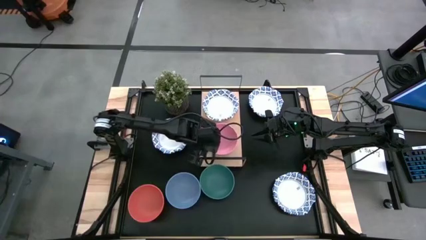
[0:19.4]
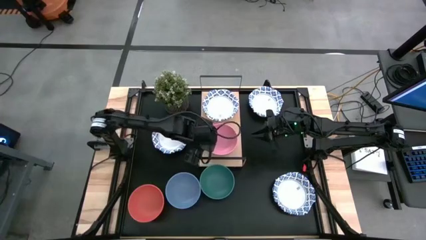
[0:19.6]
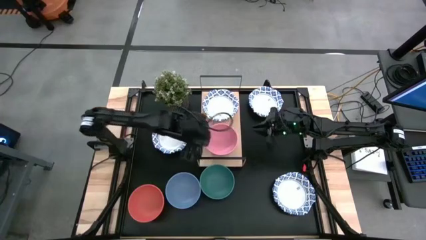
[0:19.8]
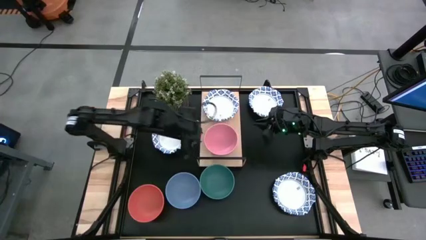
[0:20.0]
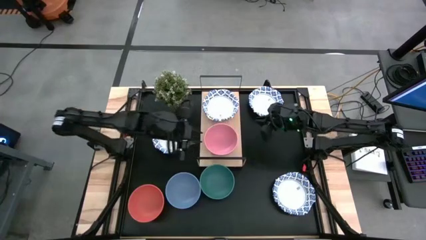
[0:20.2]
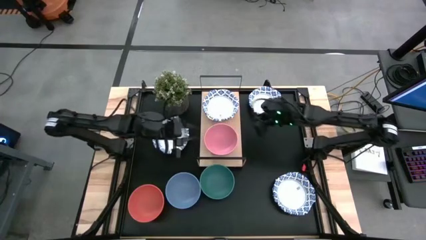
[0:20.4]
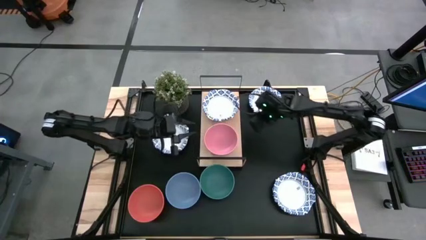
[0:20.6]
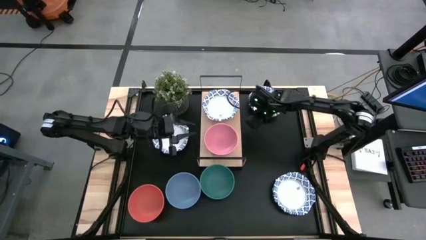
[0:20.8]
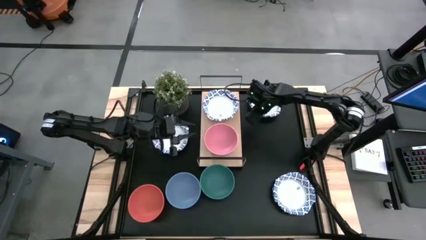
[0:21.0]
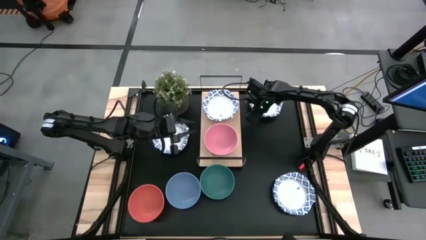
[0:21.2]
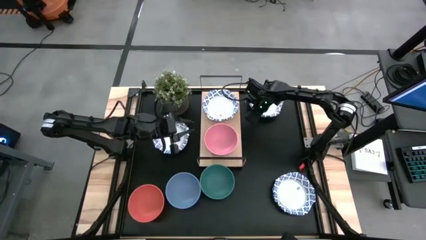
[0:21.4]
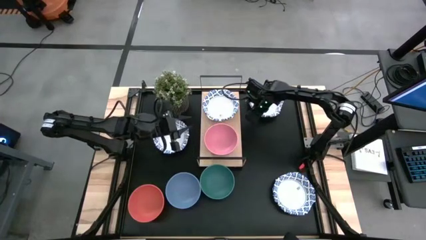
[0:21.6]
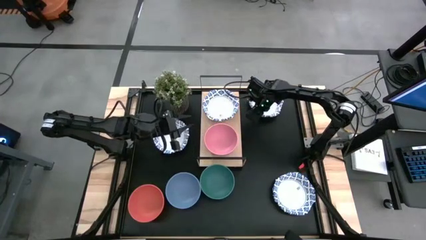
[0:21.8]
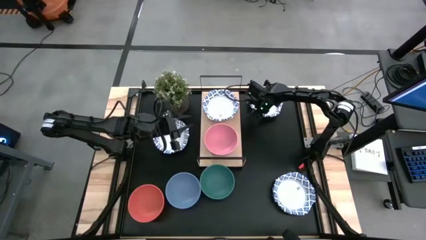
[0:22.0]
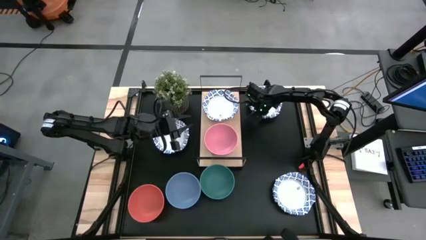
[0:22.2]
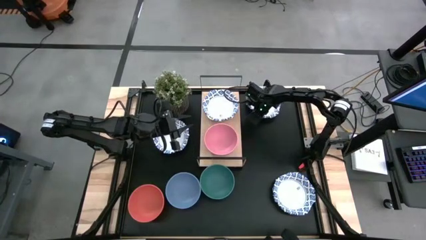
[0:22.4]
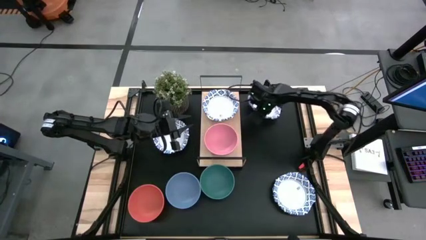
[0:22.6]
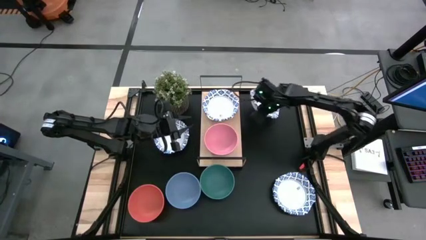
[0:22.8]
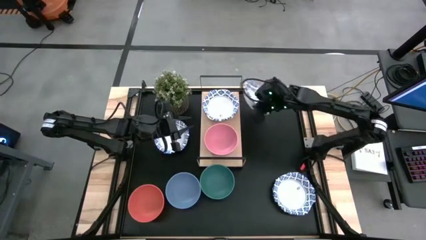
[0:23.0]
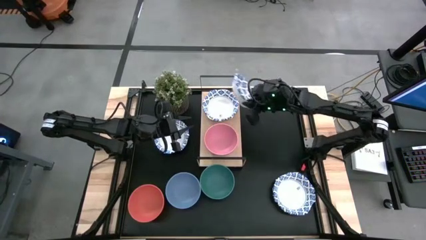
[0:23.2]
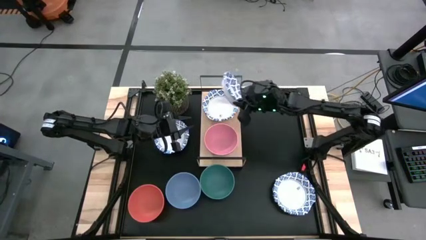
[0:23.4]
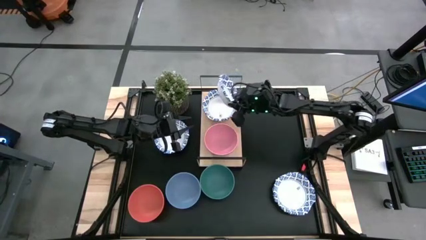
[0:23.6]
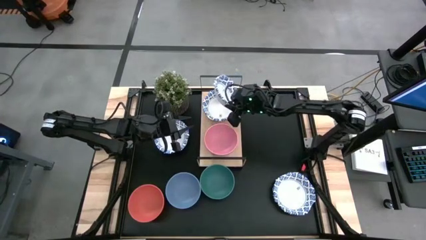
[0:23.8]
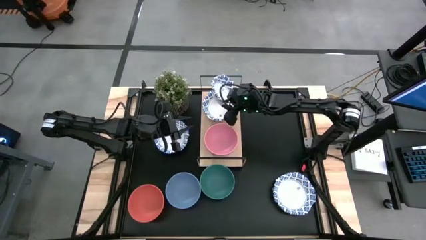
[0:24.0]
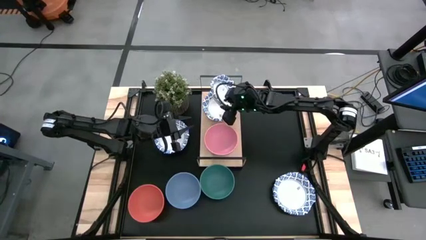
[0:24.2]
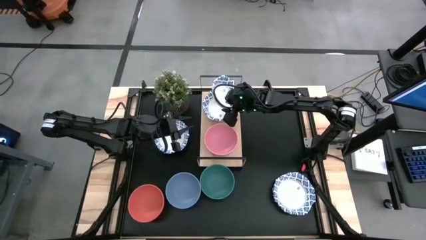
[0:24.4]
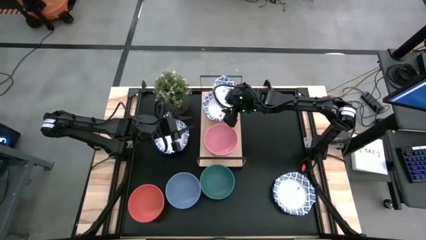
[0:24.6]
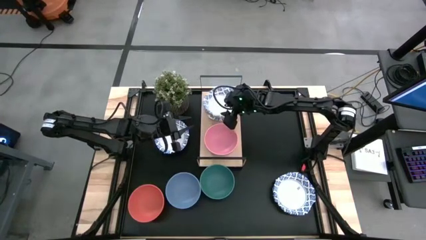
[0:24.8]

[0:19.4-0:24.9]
Task: Place and stack bowls onto a shelf
Stack the white paper bowl on top of the white paper bowl on the shelf

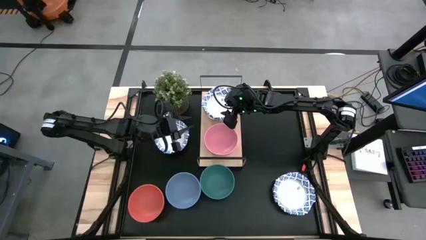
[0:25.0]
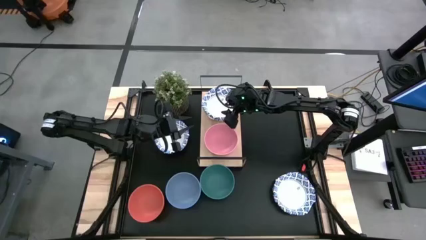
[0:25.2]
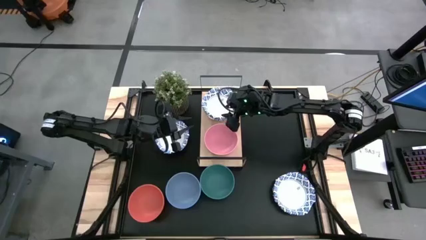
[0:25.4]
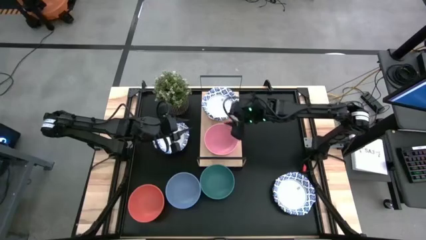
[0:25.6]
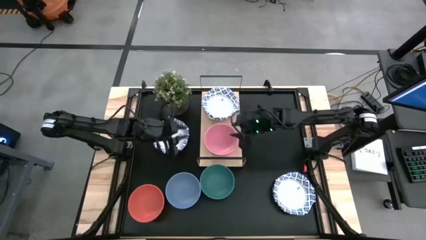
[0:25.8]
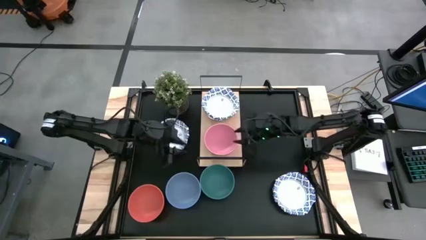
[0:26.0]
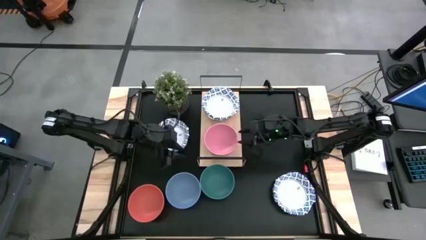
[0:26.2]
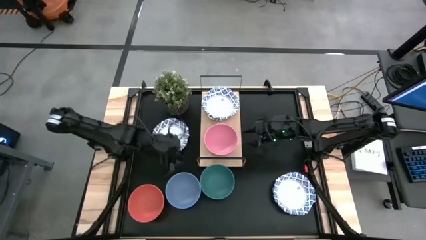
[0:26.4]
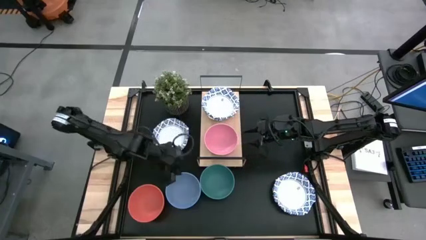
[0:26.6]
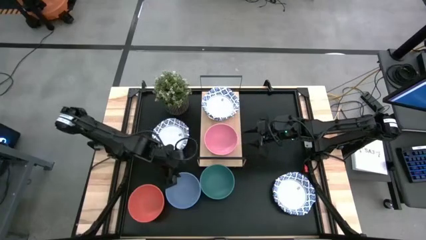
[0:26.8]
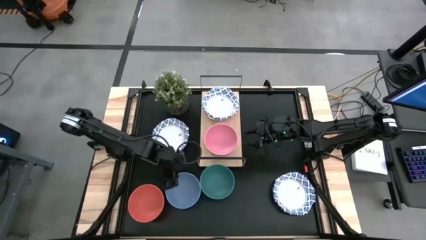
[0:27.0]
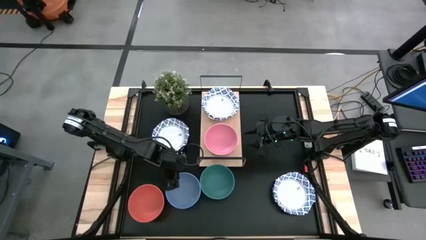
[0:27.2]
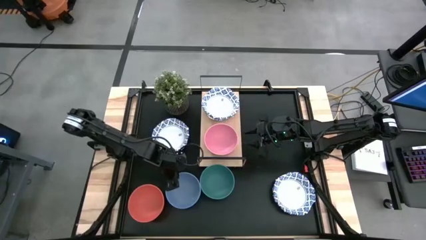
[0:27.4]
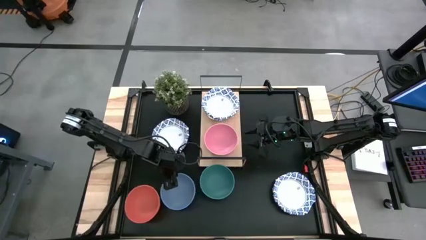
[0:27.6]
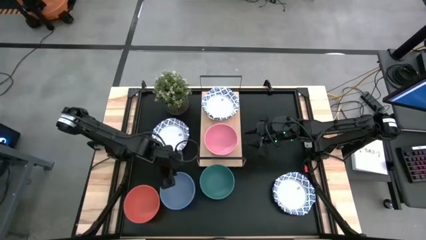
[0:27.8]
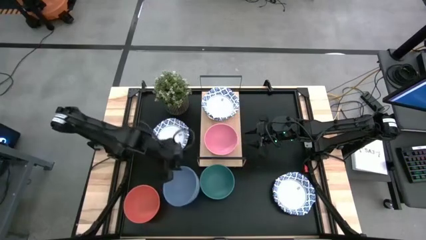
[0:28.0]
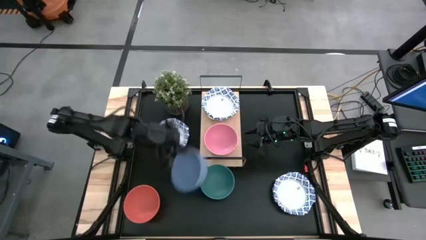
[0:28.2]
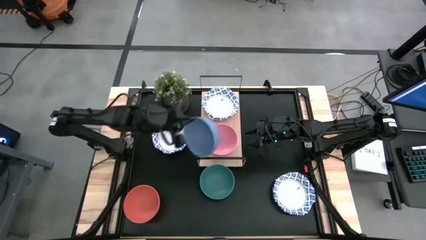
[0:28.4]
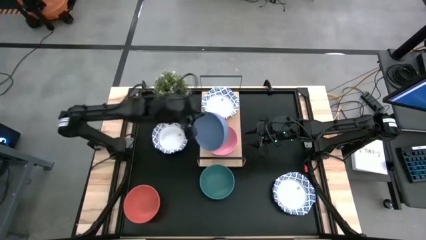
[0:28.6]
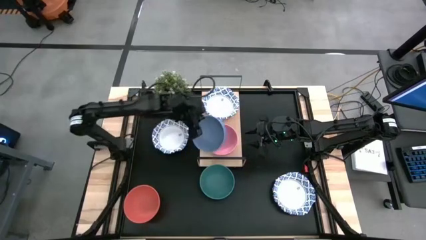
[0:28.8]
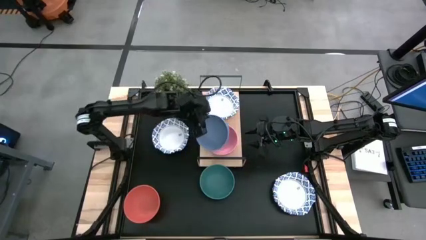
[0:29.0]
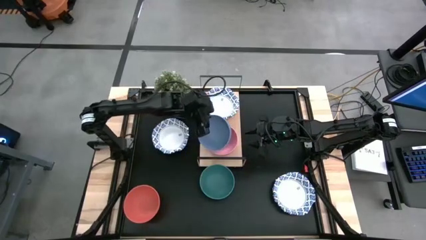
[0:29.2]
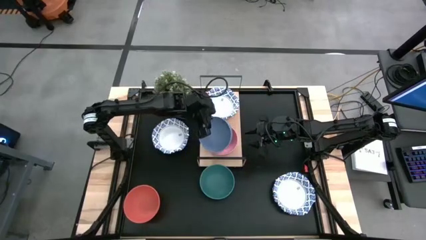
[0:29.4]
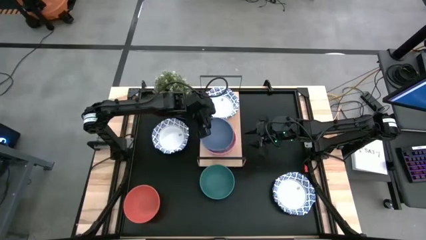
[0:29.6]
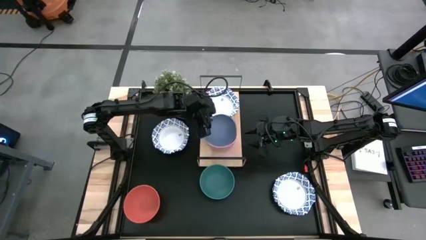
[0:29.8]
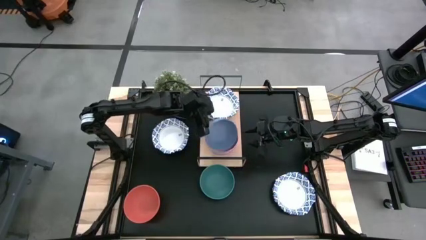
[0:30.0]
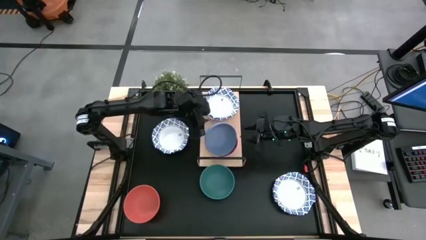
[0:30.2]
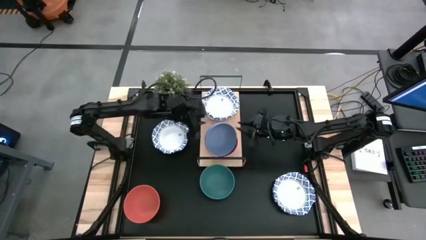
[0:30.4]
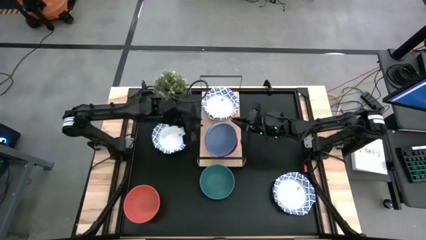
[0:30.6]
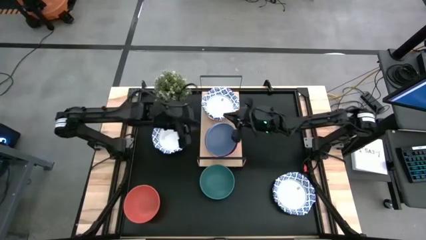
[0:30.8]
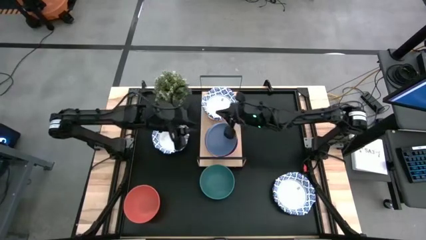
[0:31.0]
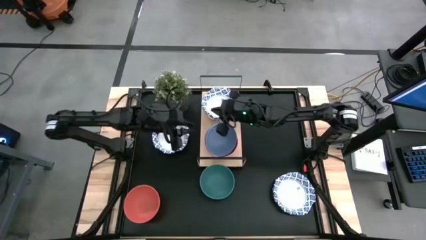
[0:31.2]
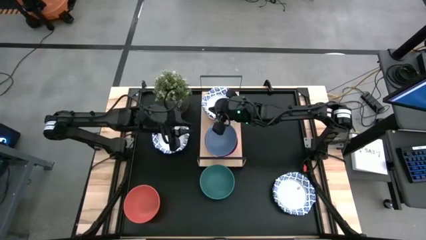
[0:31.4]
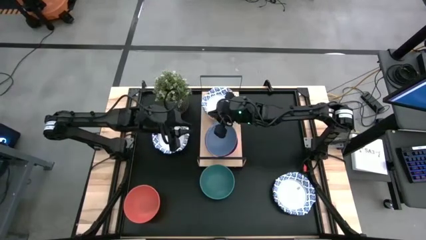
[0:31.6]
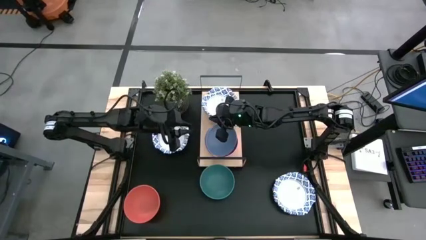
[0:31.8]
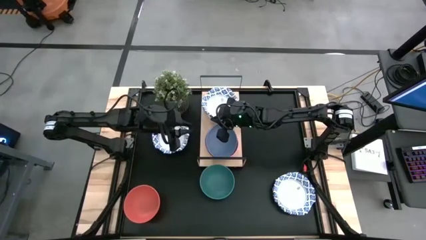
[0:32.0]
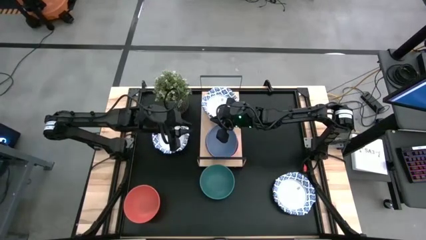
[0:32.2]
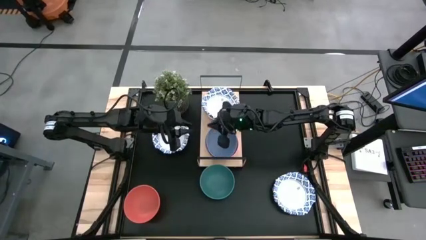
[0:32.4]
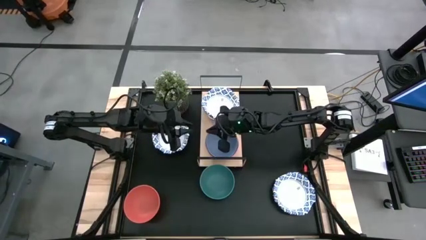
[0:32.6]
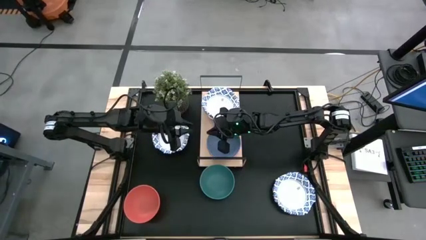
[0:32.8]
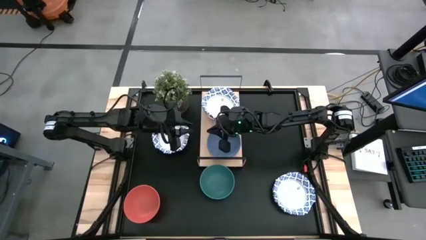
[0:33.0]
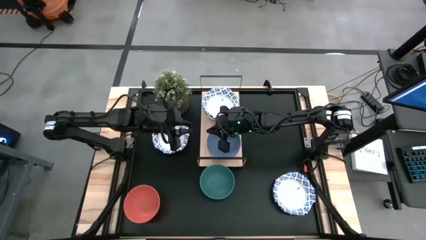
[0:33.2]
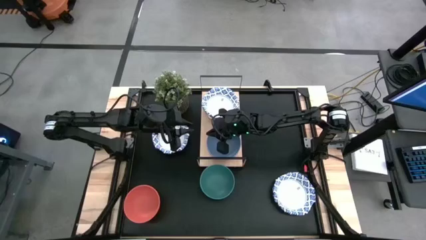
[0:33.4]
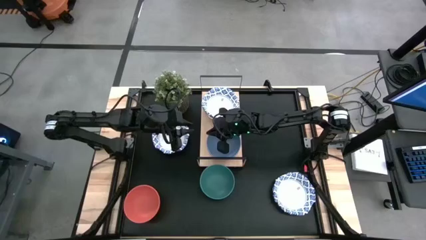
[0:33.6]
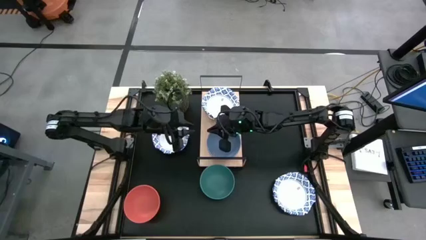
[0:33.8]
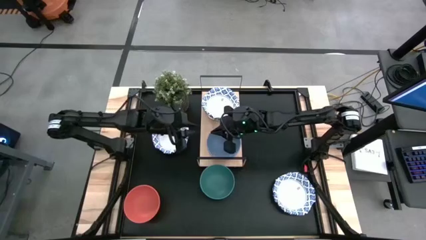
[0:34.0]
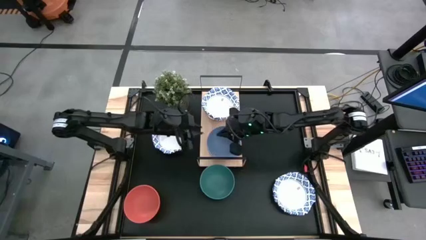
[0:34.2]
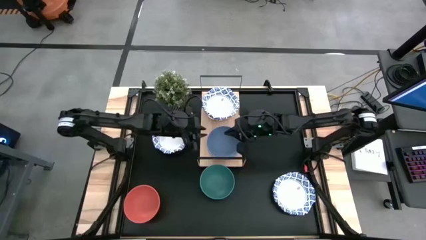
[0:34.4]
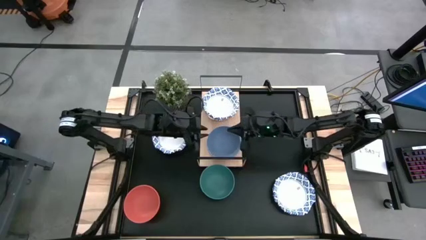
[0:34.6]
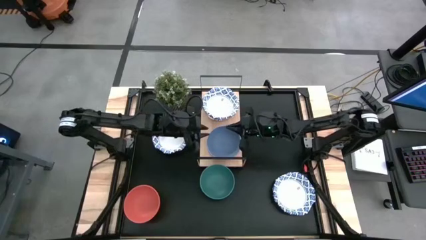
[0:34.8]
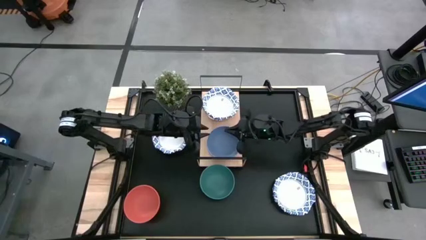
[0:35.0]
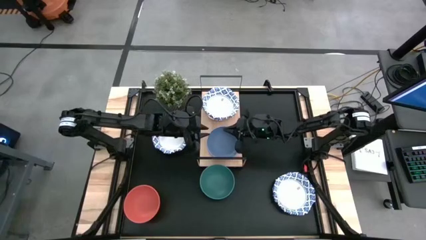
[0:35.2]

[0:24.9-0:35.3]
Stack the plastic blue bowl on top of the plastic pink bowl on the shelf
